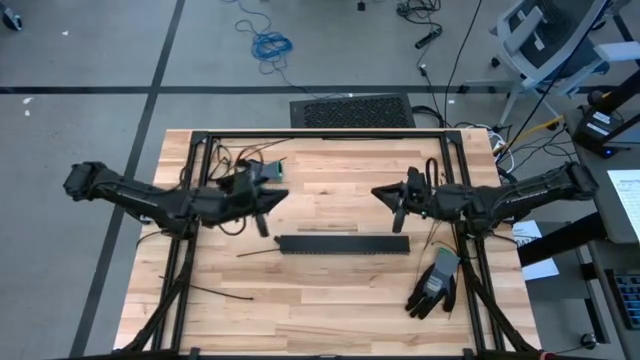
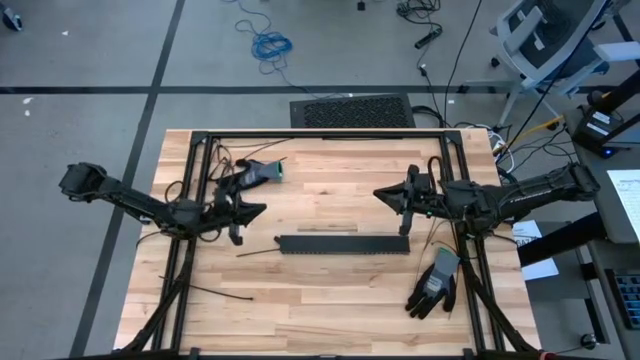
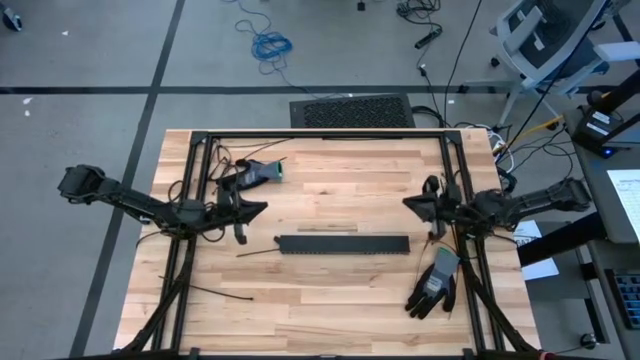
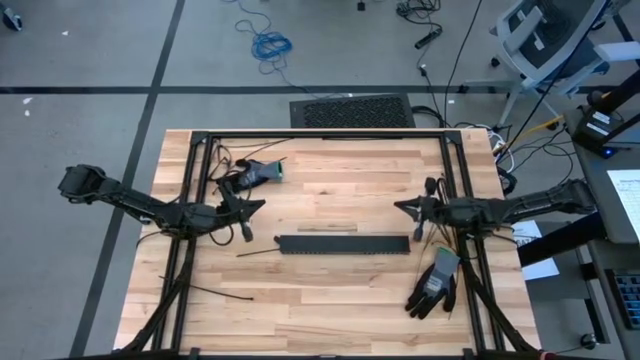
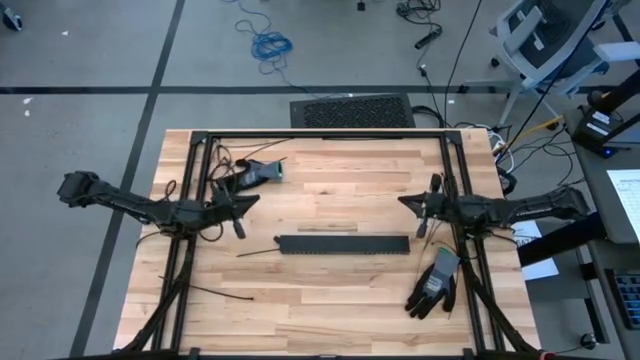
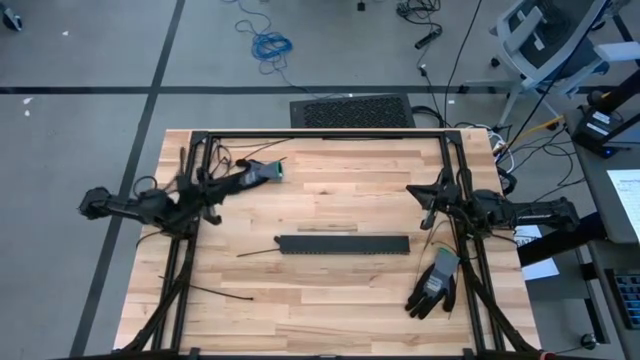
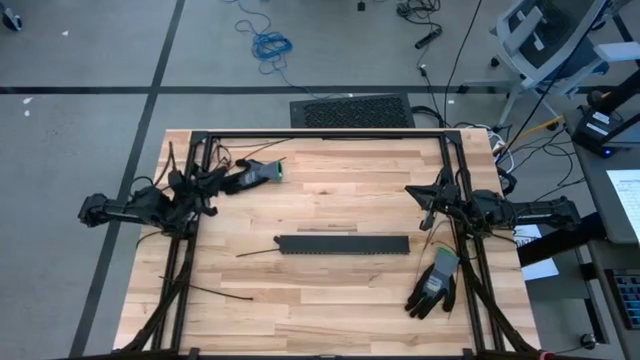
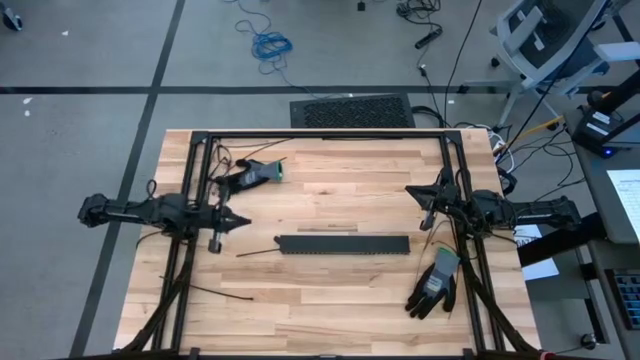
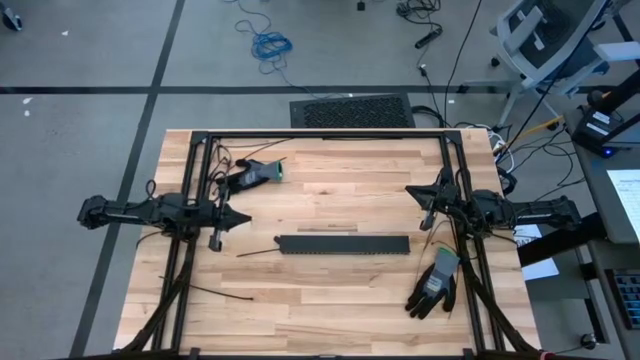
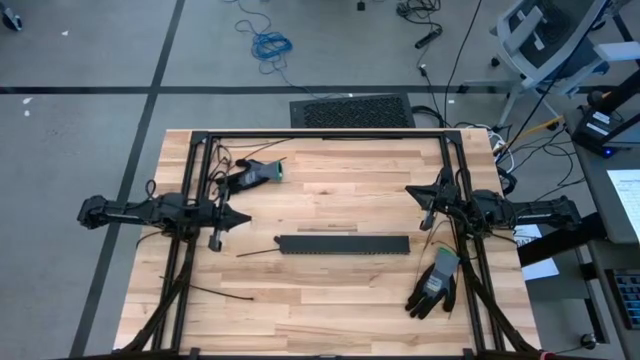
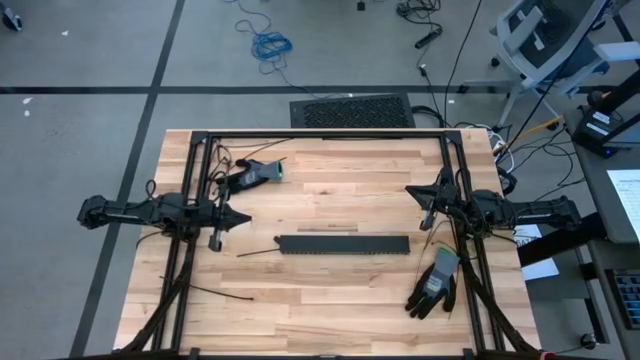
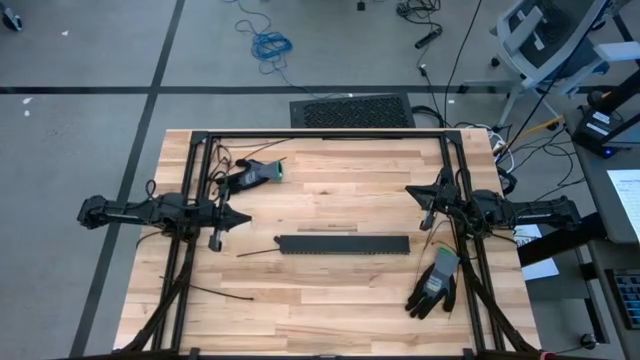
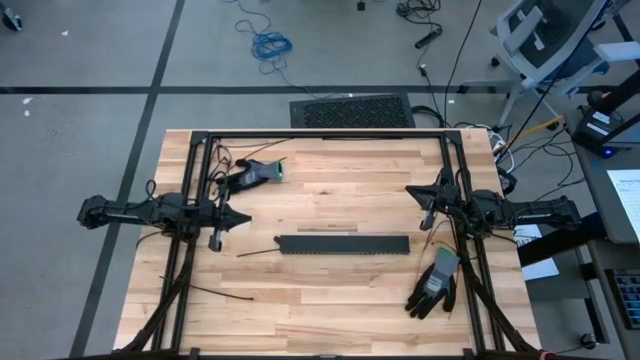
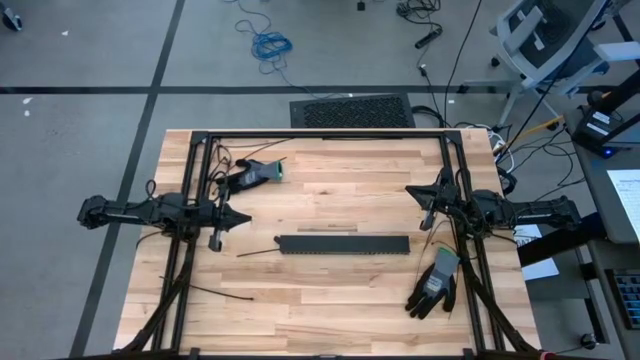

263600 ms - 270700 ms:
Task: Ziptie cables
Return to Home Position

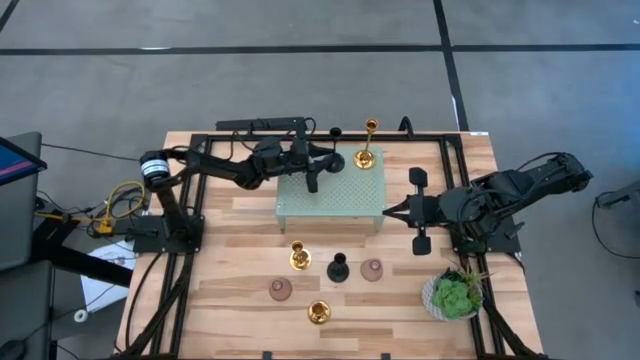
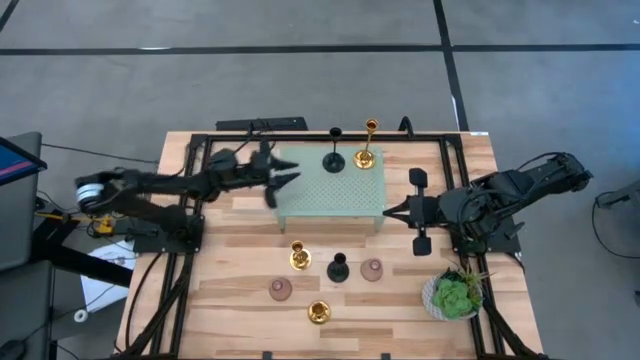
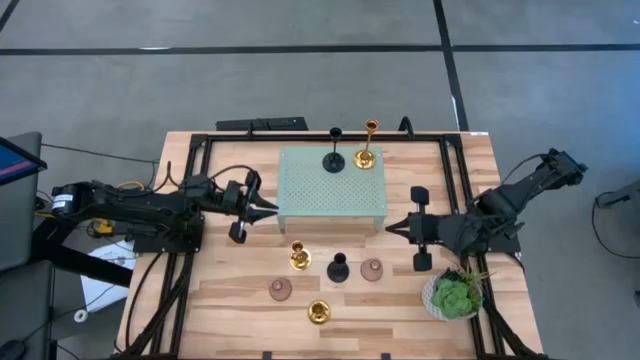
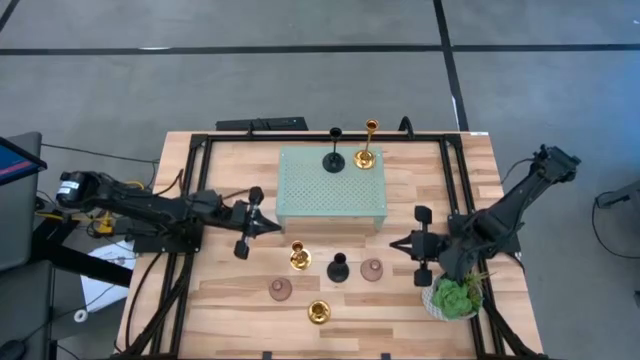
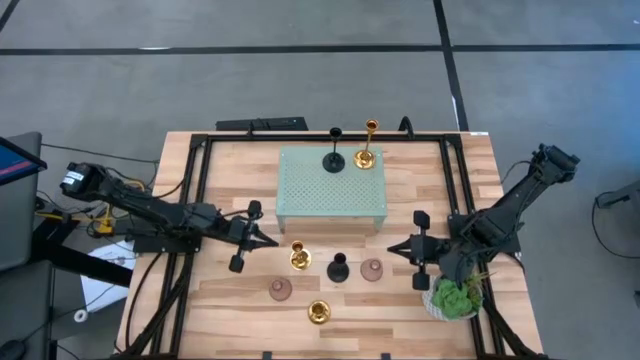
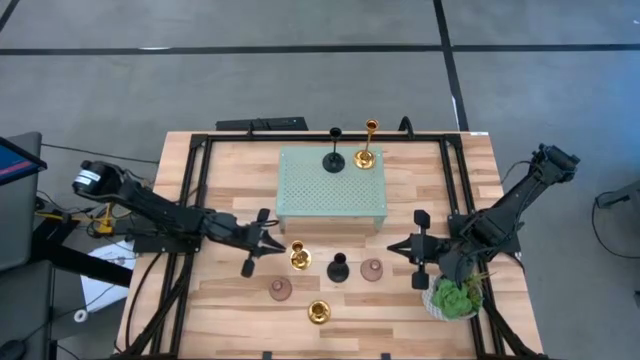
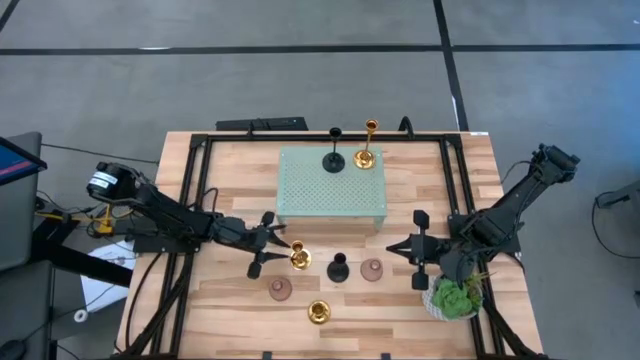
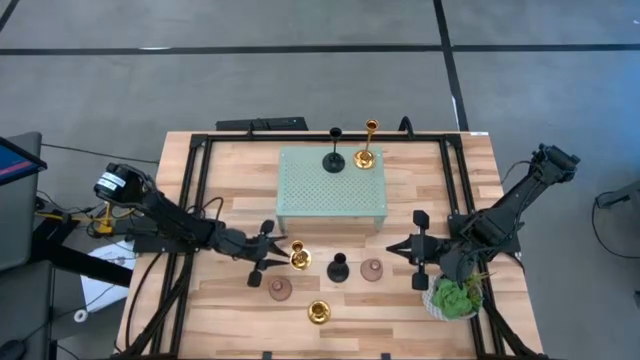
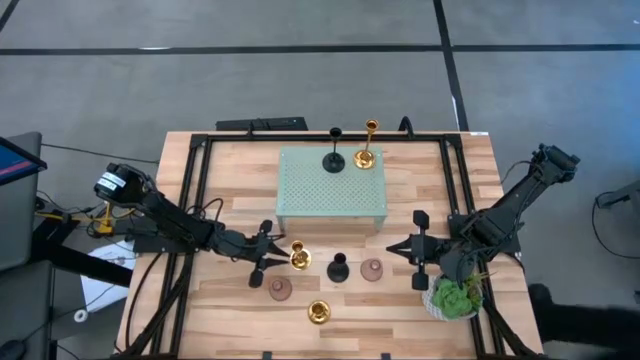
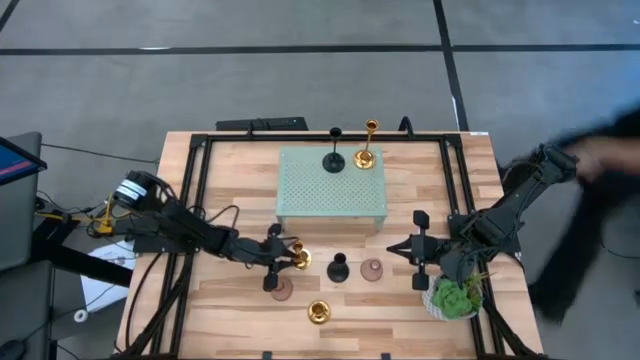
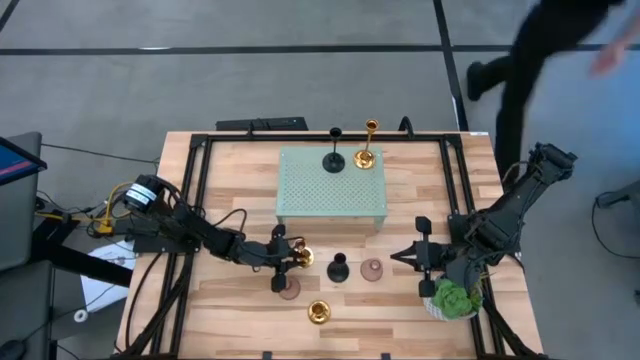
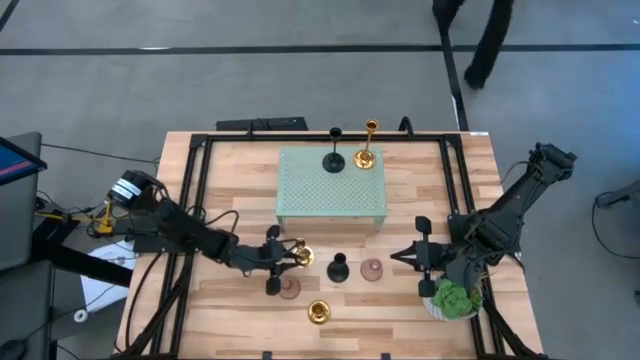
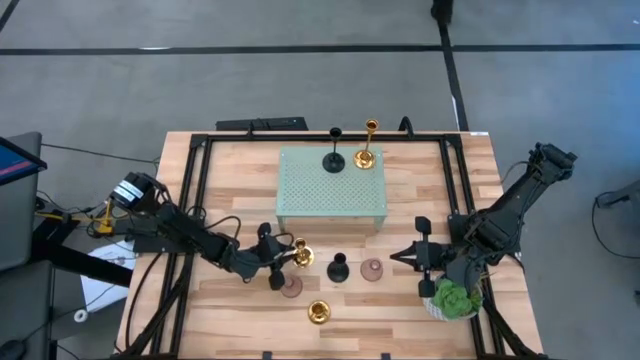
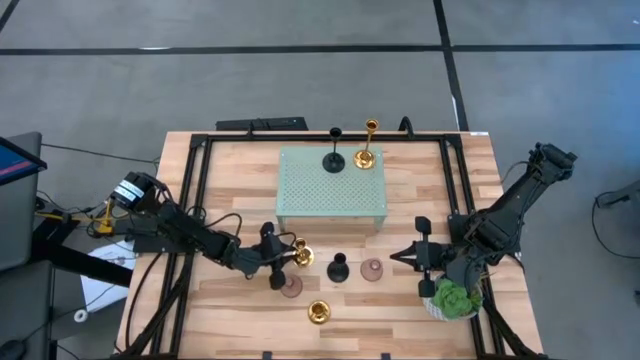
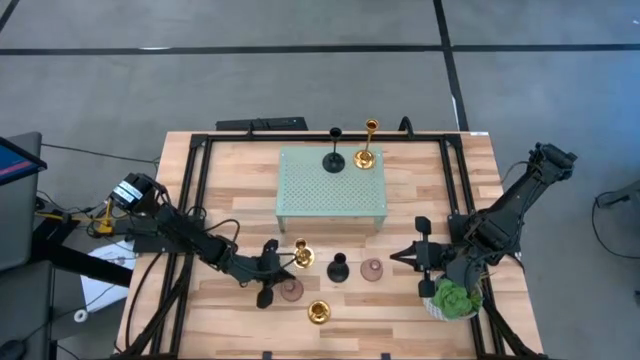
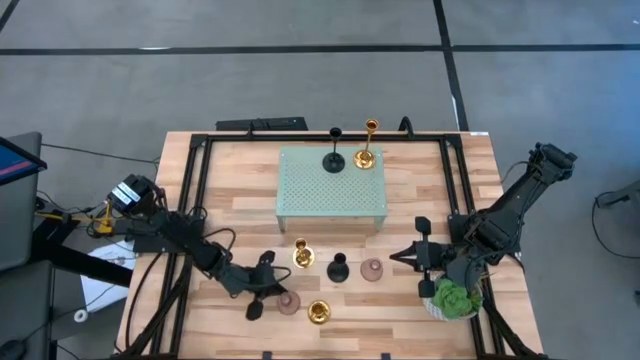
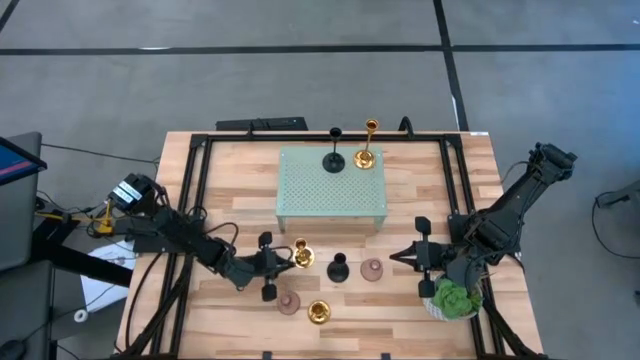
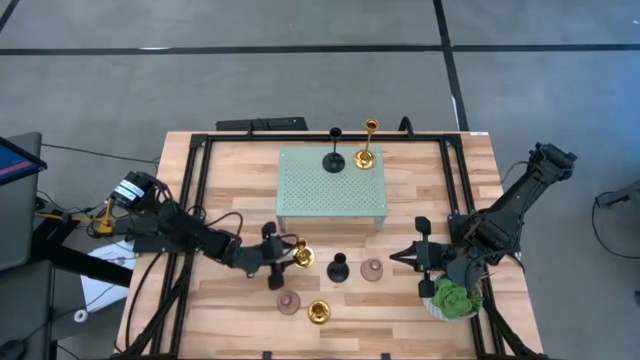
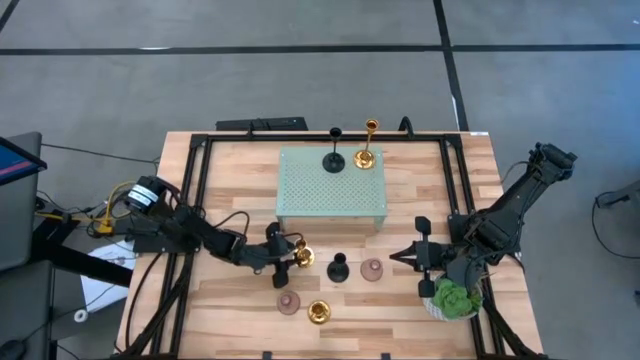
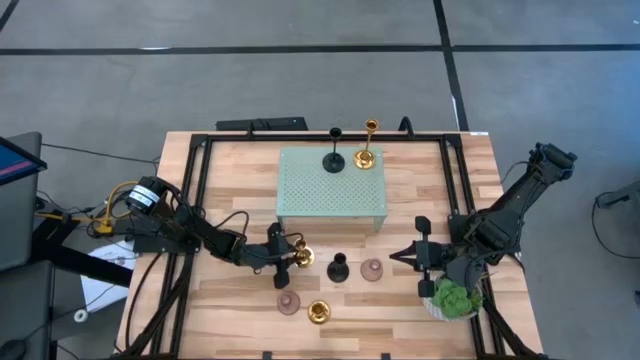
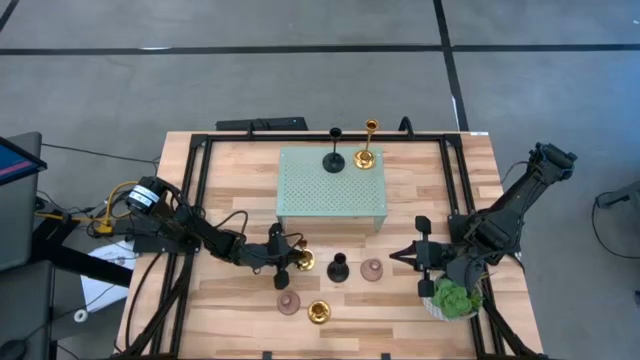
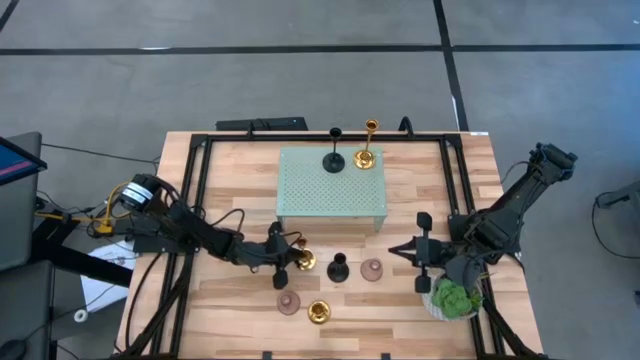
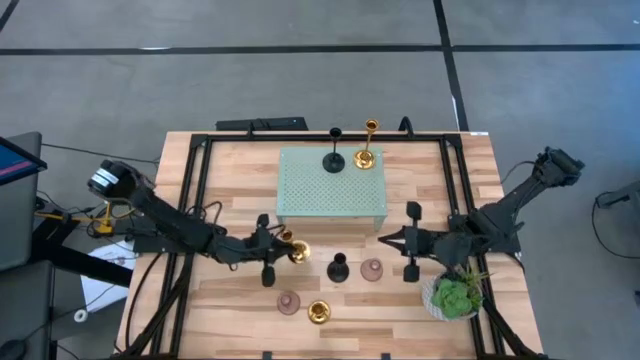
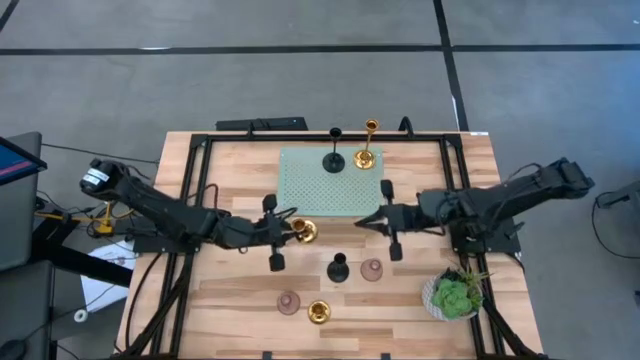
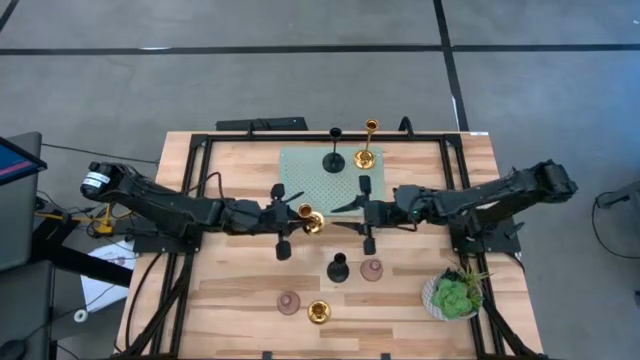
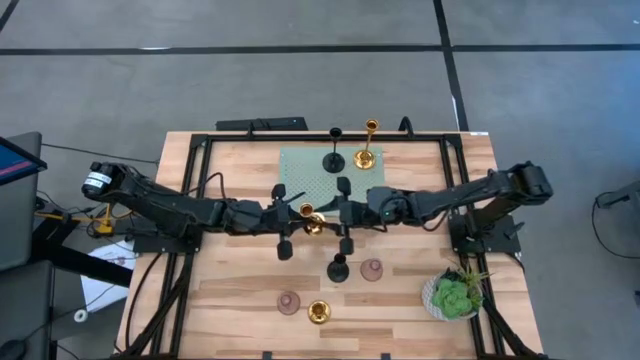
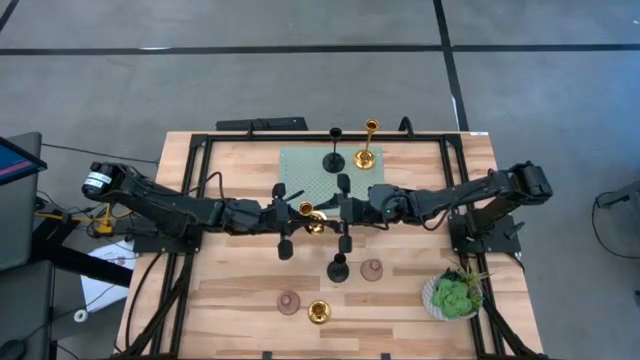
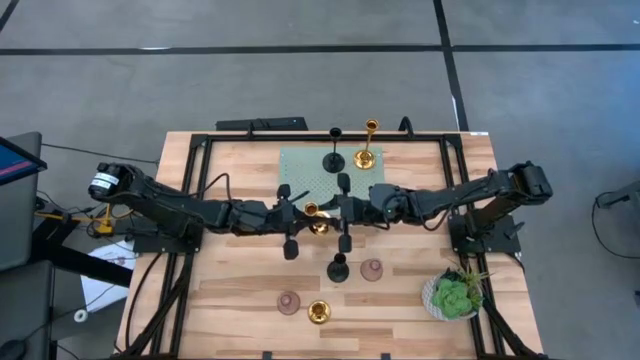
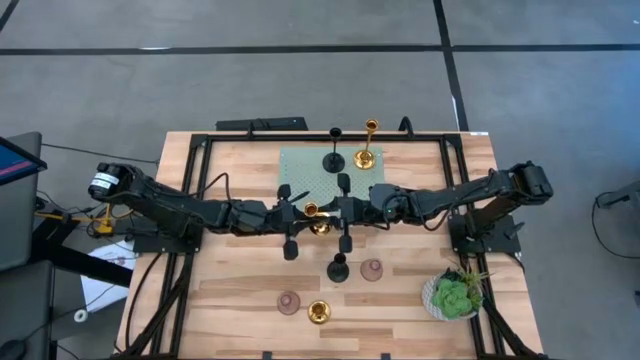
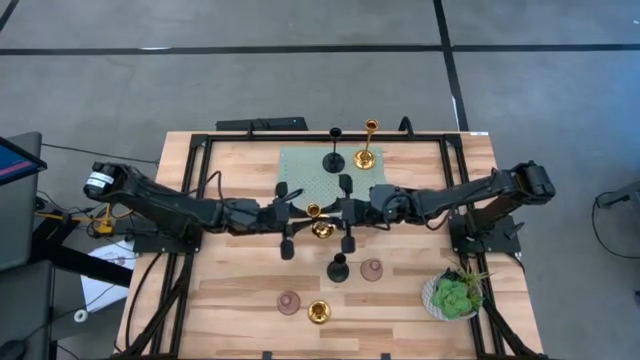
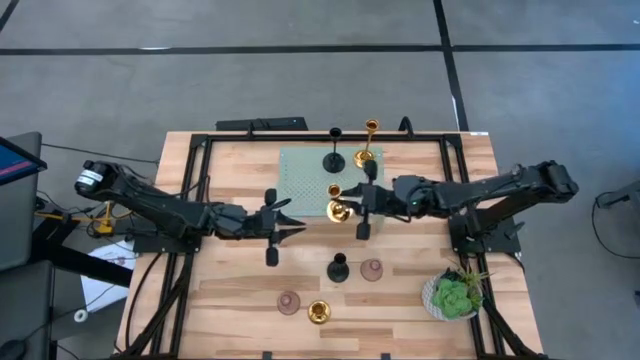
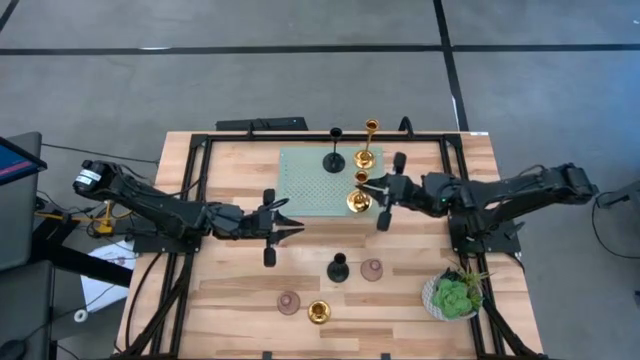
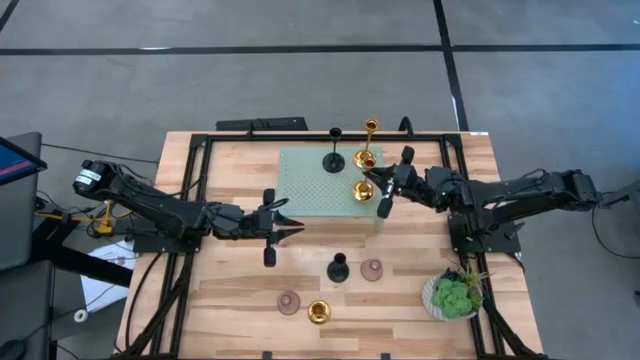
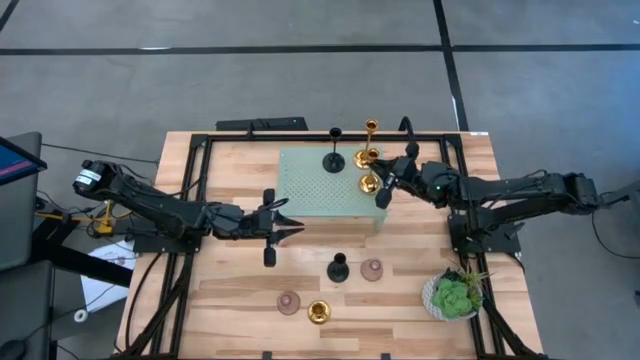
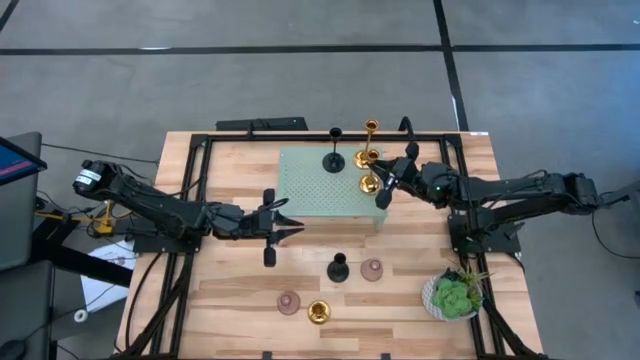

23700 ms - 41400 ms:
Task: Pick & Place candle stick holders
Put the top gold candle holder on the shelf aligned with the other gold candle holder
